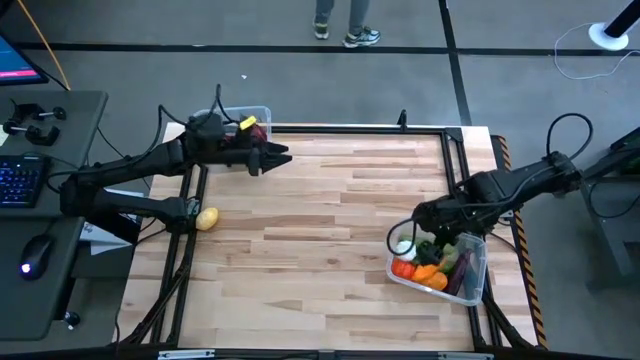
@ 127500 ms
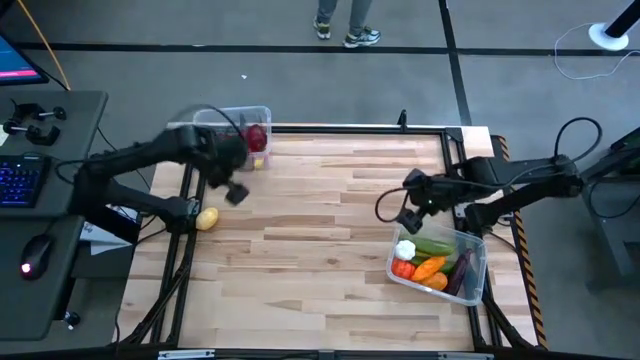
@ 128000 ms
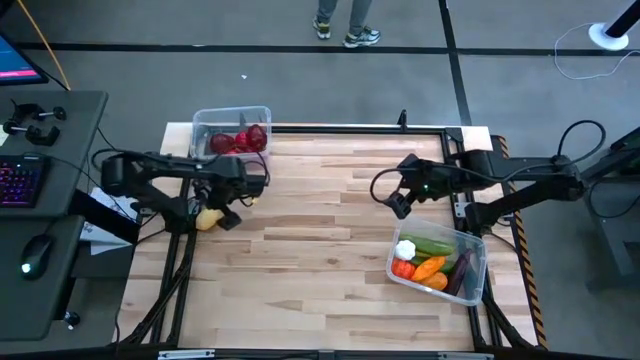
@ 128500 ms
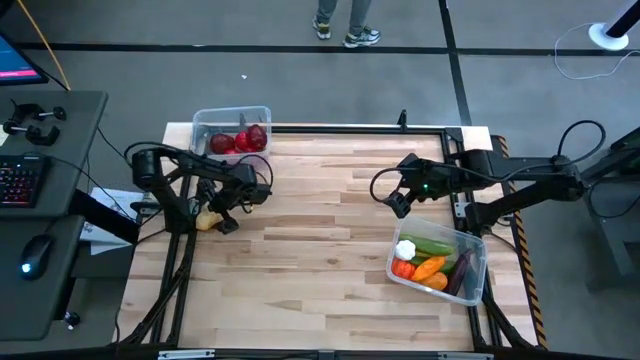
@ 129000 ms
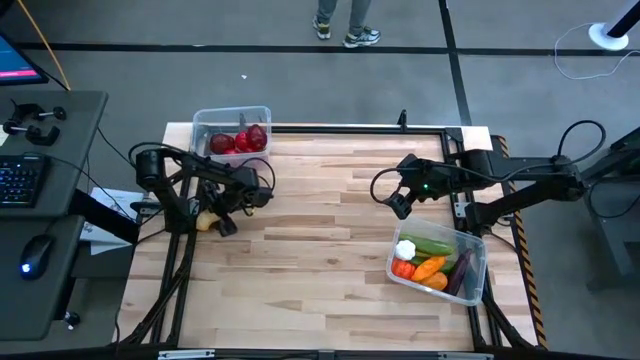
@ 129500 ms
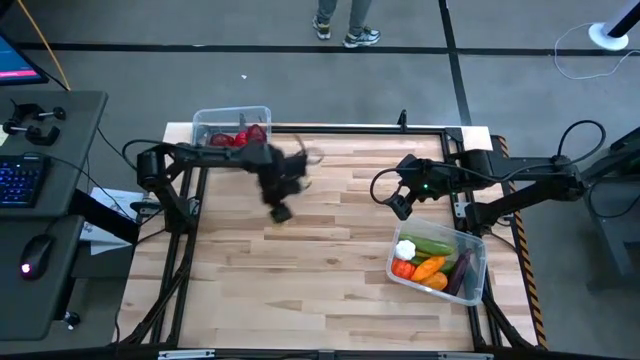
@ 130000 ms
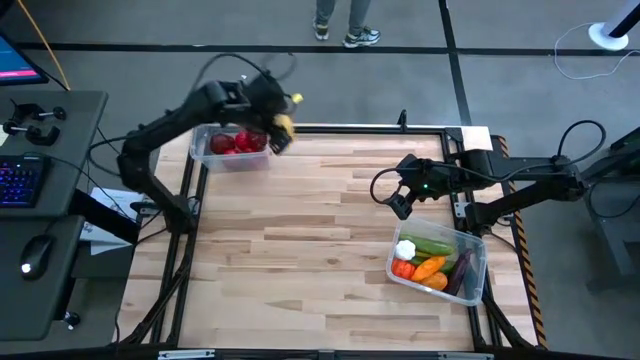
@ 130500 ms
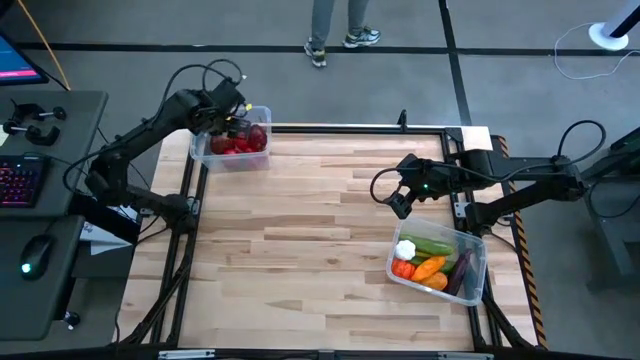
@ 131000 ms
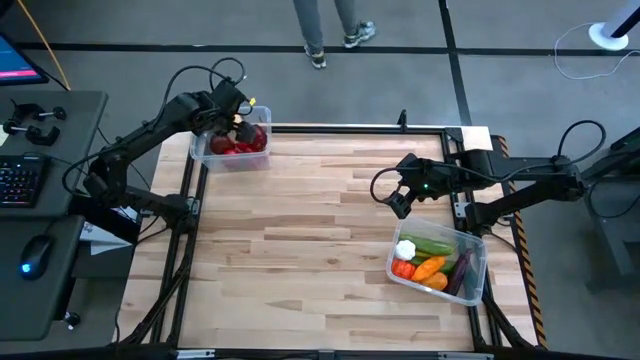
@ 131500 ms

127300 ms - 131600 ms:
Task: Sort produce into baskets
Put the yellow lemon into the top transparent bin

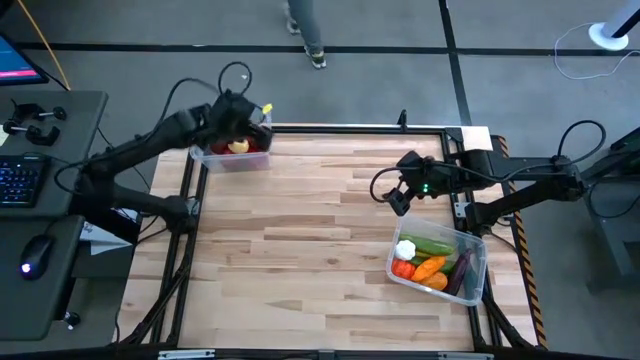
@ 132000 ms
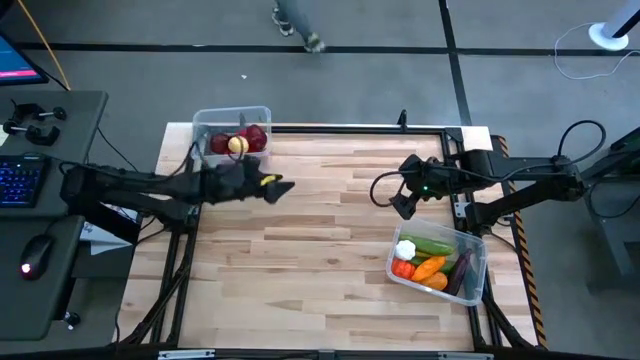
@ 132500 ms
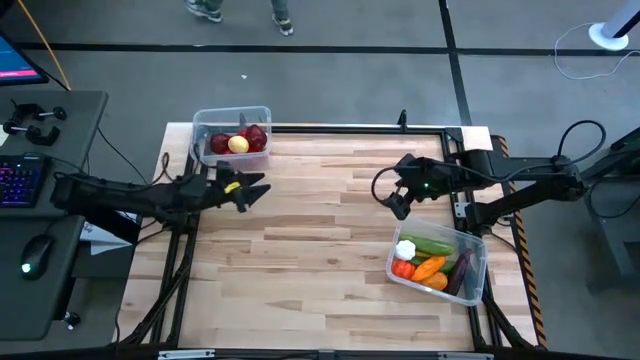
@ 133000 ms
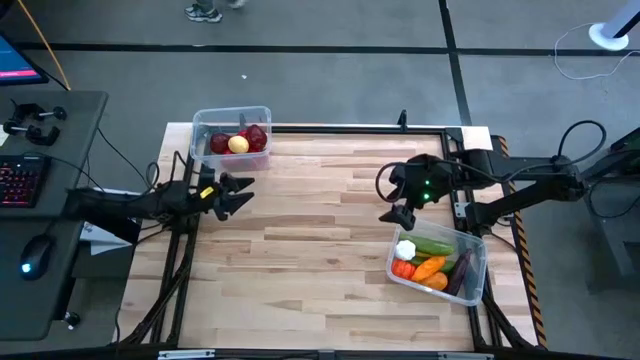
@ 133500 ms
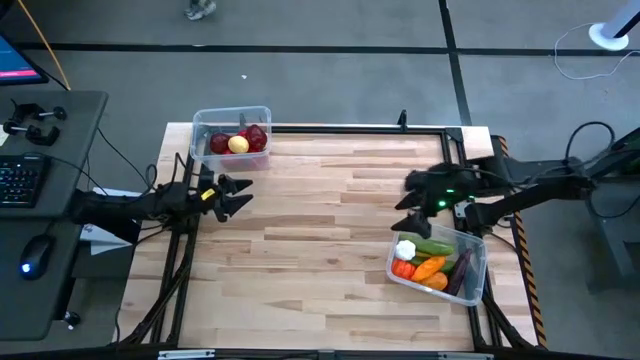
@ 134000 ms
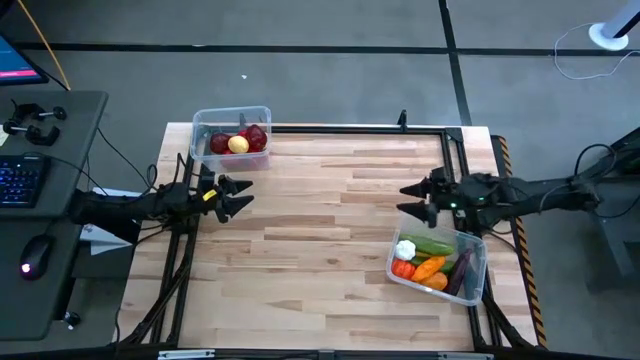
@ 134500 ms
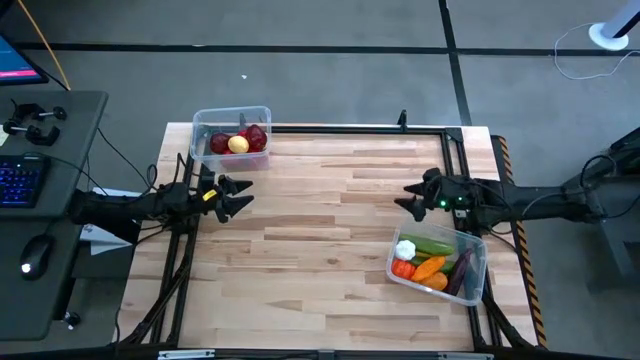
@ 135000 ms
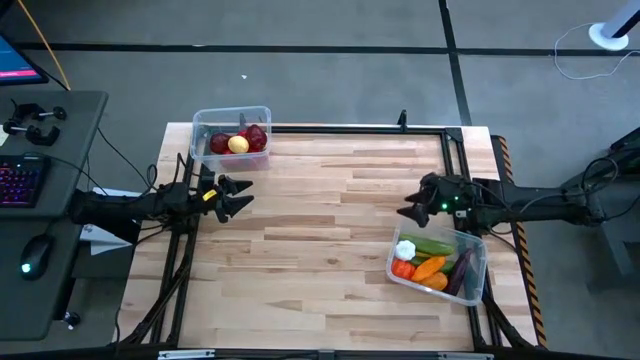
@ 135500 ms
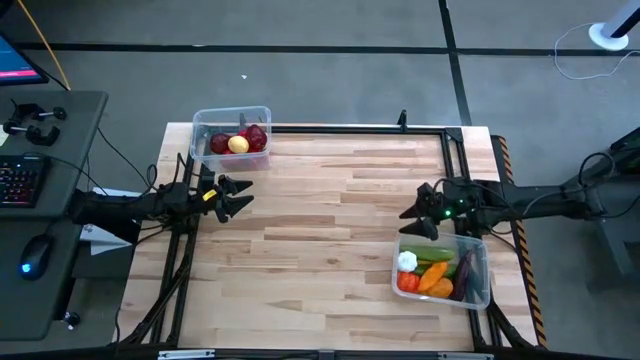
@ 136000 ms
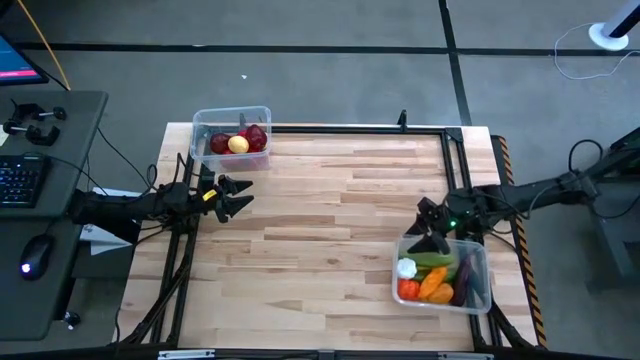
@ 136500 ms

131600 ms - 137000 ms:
Adjust the bottom transparent bin on the table

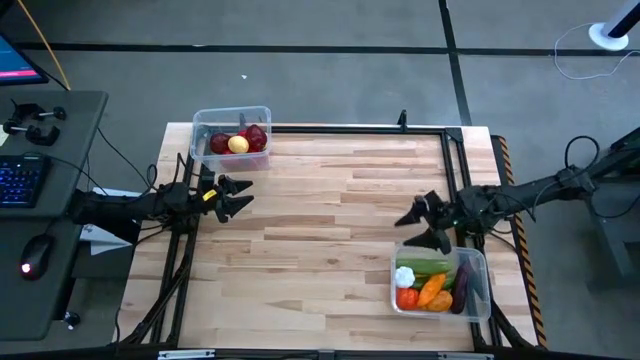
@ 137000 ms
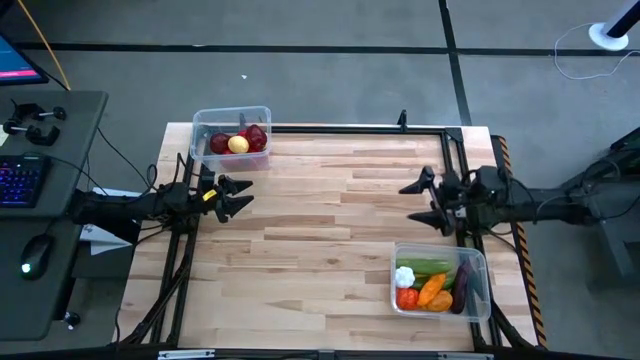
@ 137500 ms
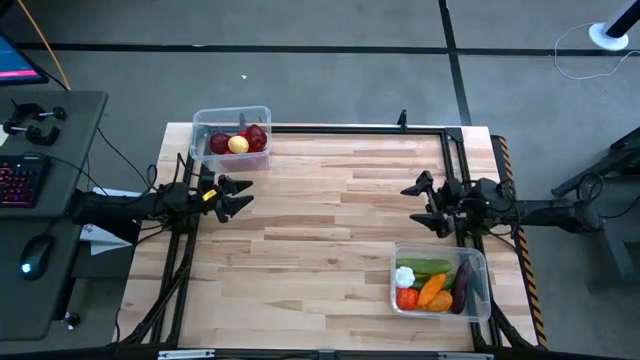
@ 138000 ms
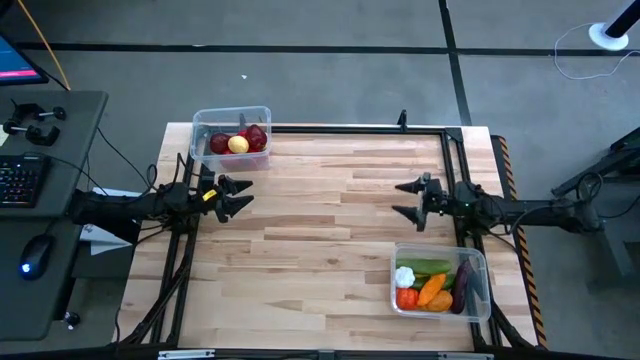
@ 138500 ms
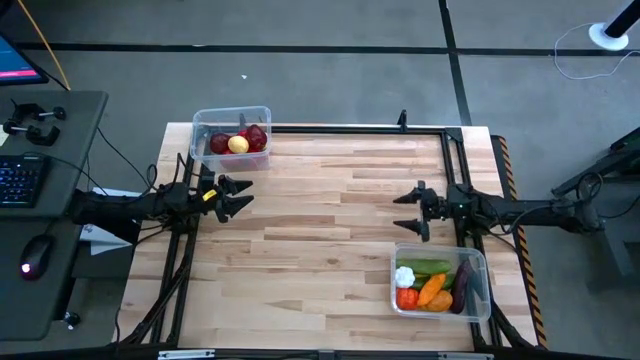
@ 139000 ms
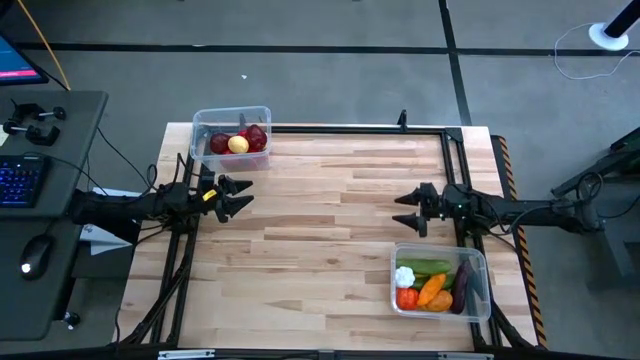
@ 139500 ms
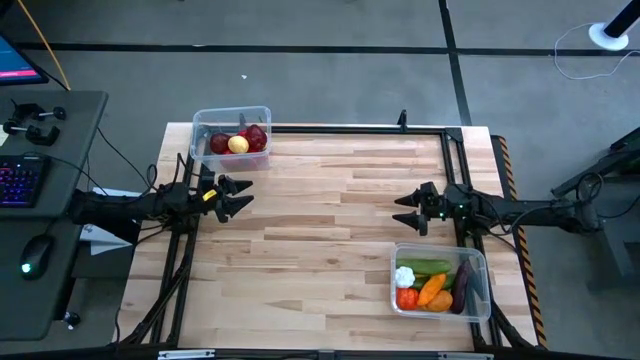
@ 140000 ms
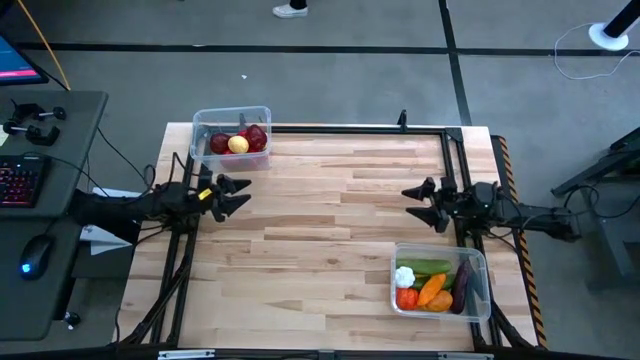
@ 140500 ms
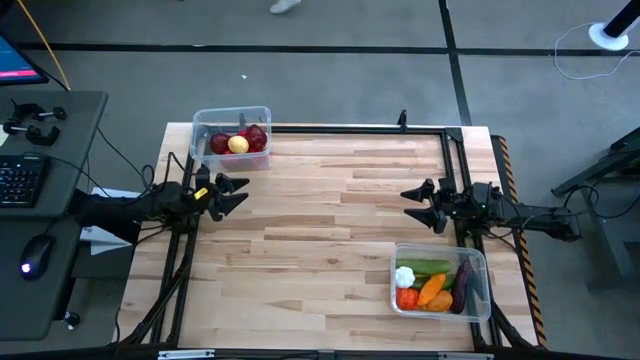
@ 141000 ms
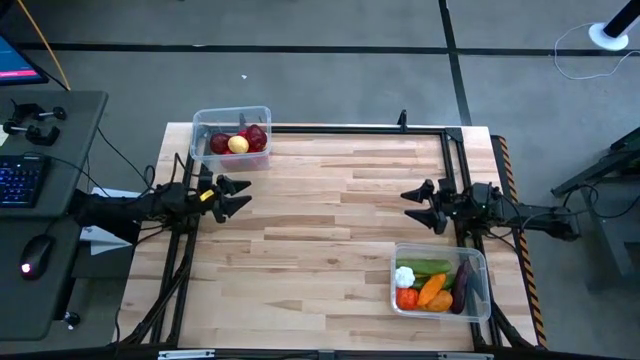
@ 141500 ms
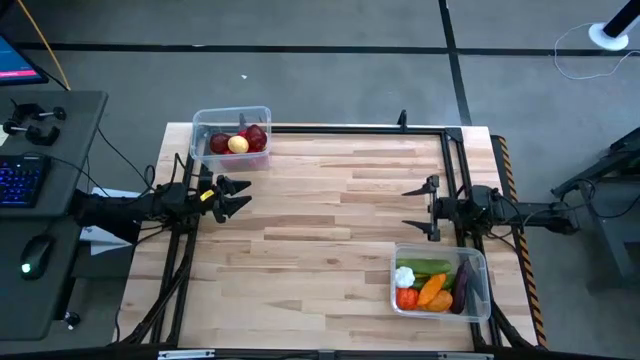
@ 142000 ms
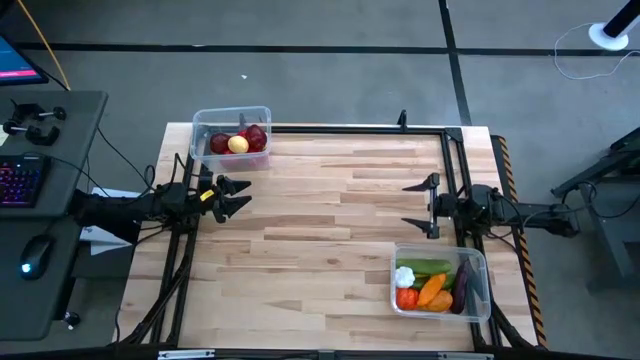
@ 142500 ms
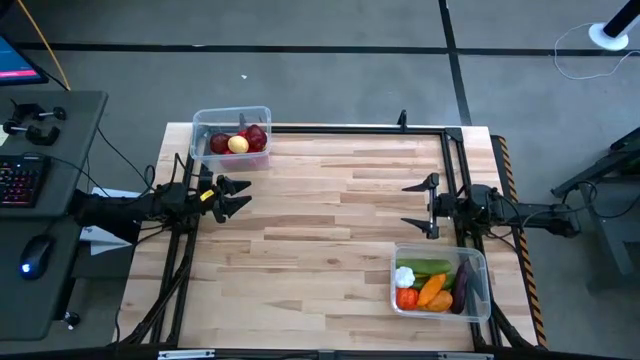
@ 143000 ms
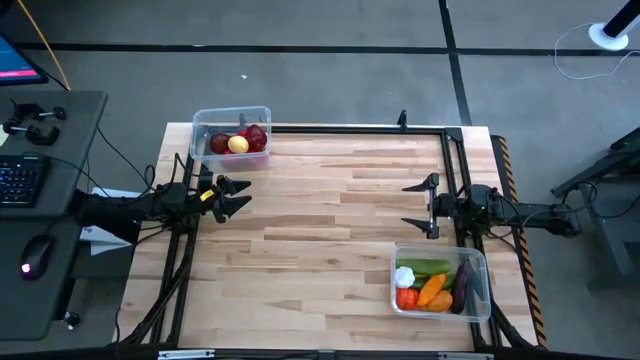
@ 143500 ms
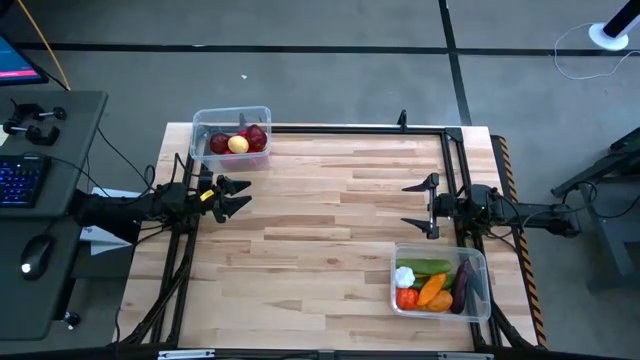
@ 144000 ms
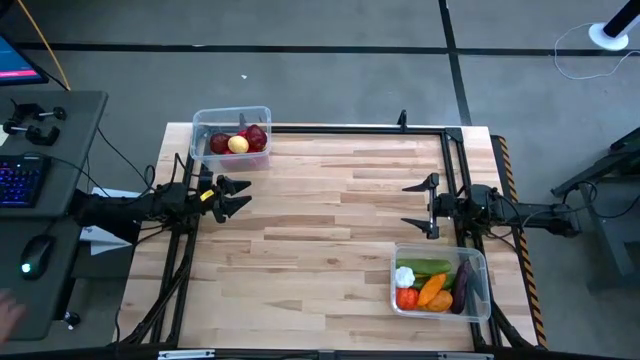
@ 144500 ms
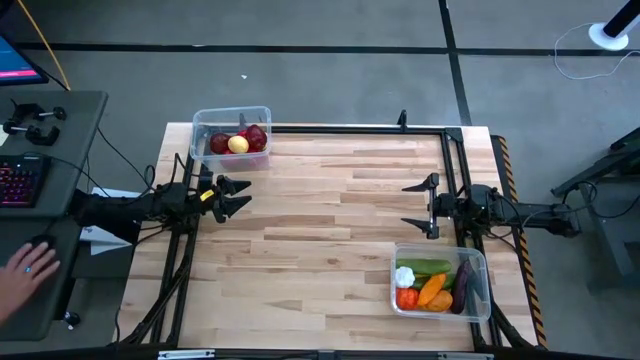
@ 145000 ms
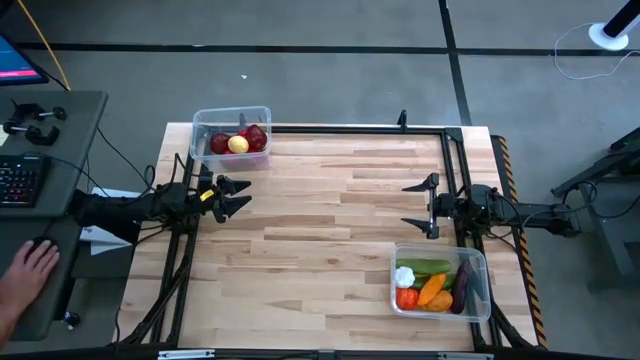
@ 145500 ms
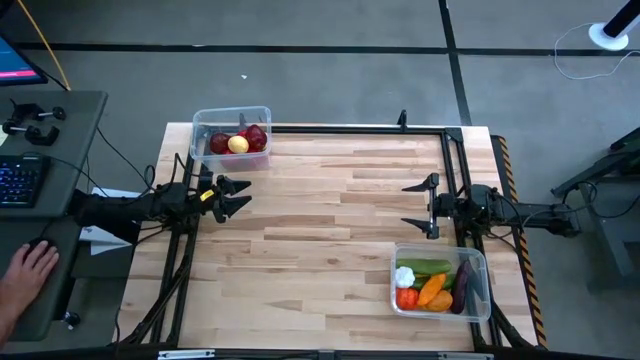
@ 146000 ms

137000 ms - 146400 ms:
Return to Home Position

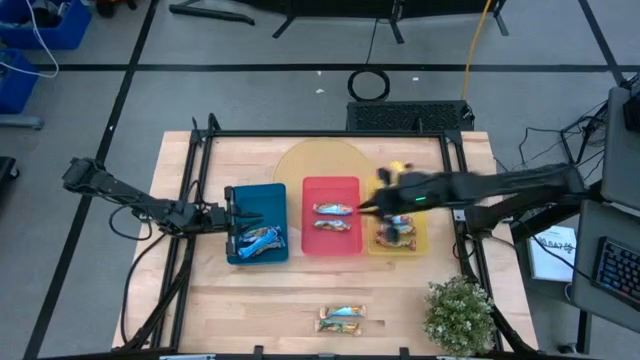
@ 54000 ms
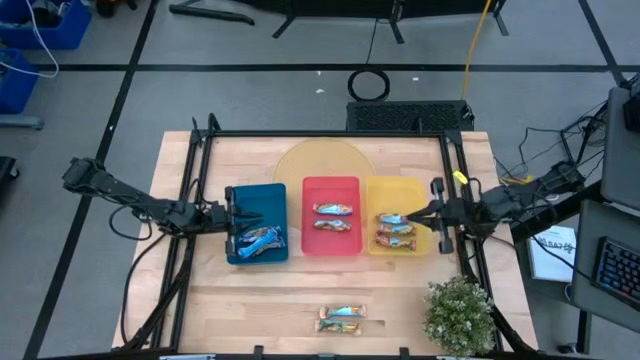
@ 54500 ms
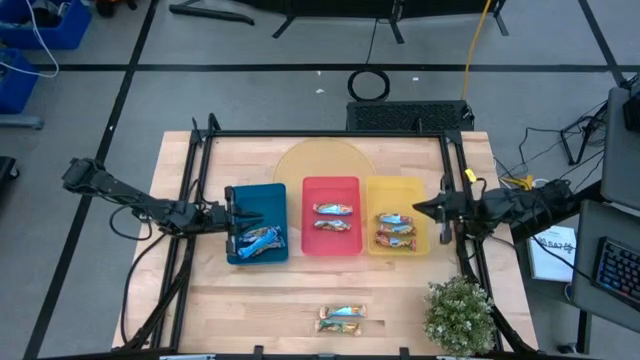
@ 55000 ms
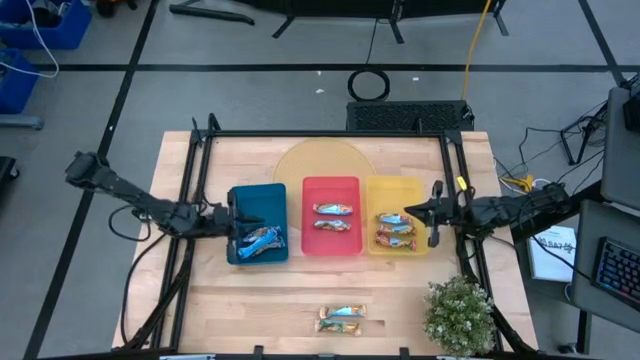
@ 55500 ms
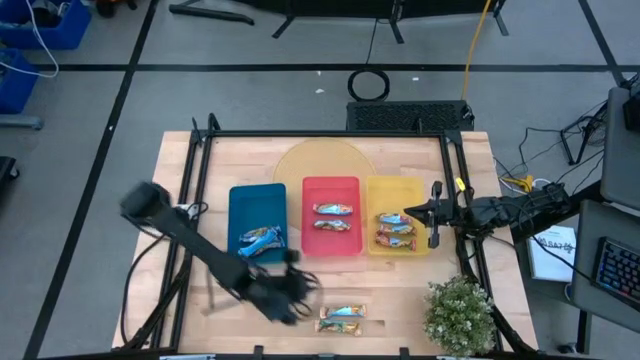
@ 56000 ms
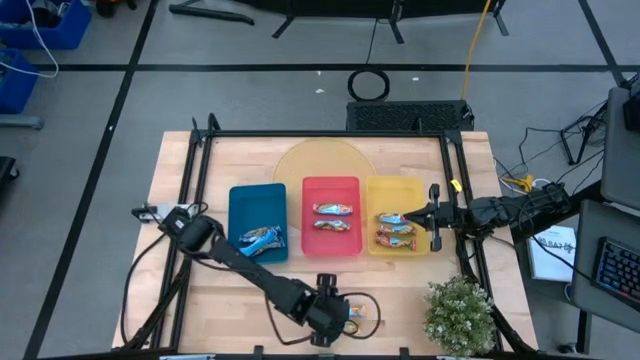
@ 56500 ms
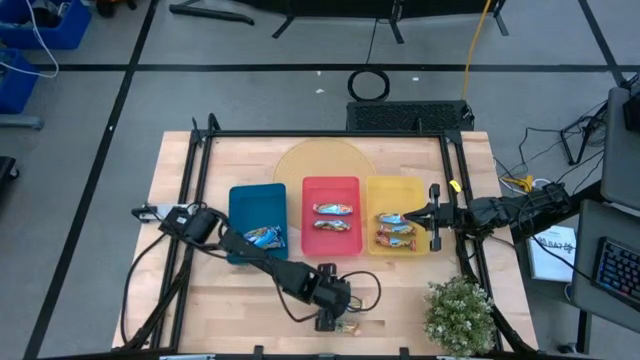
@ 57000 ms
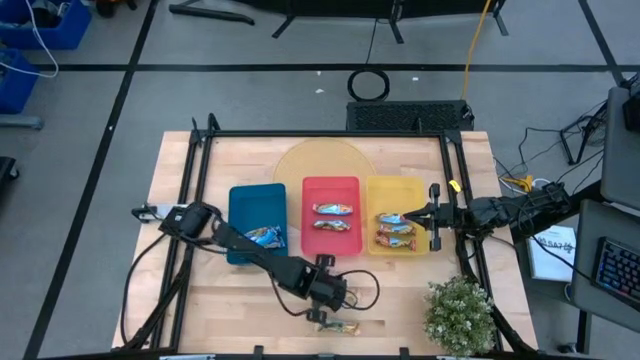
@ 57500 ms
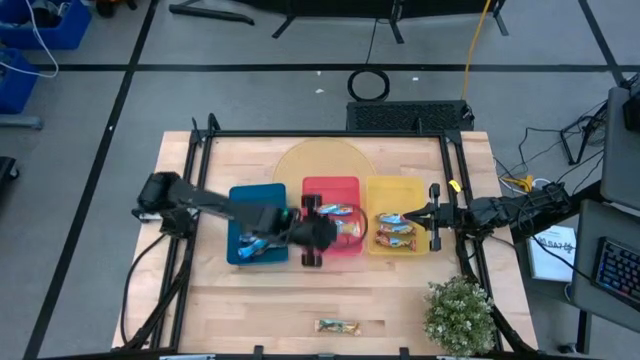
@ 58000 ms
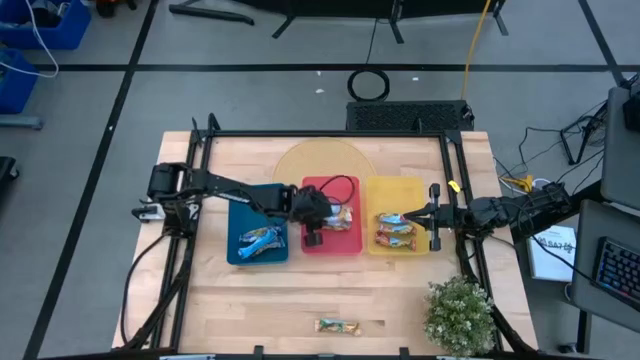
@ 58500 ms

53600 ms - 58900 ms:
Task: Pick and place Granola Bars by type
Put the top yellow granola bar into the red bin
